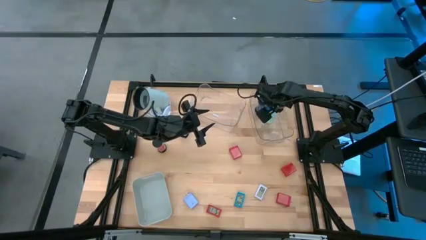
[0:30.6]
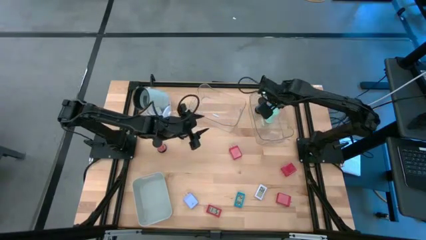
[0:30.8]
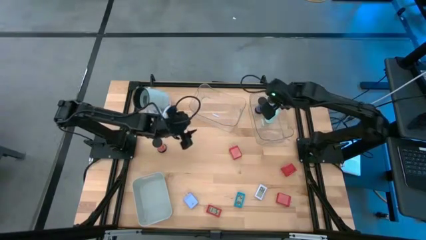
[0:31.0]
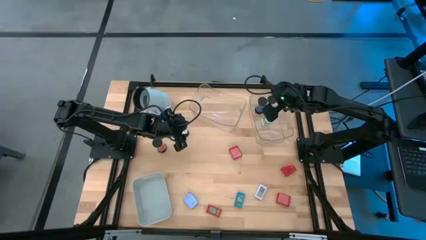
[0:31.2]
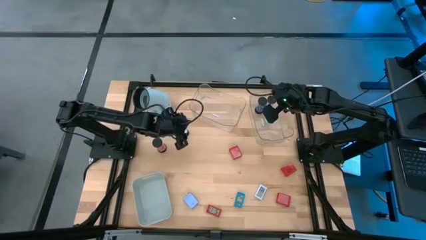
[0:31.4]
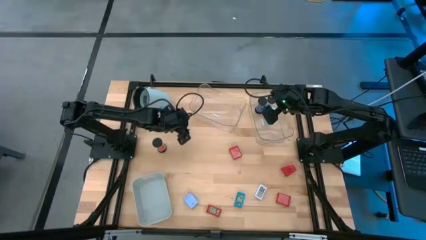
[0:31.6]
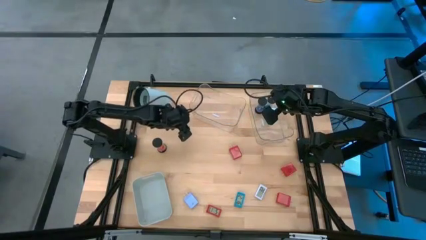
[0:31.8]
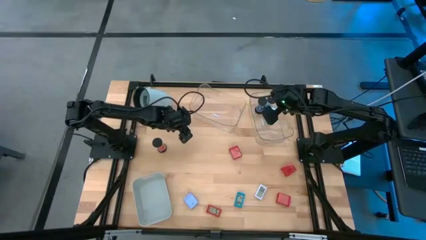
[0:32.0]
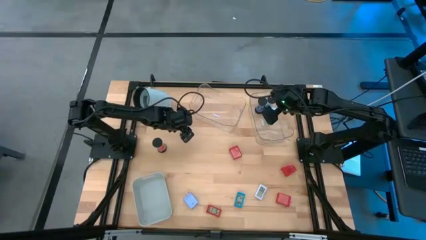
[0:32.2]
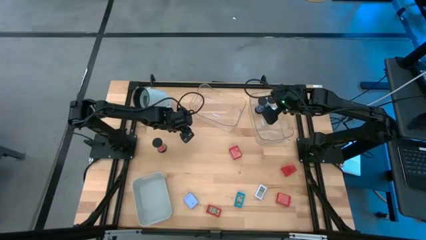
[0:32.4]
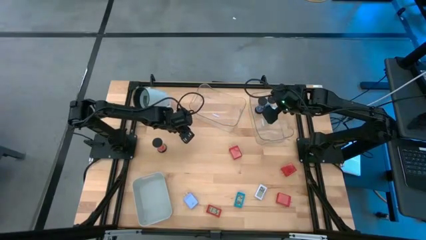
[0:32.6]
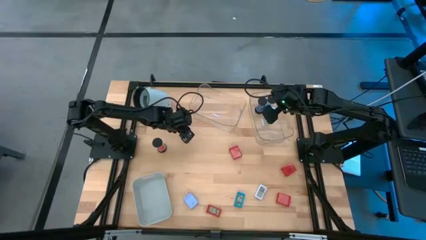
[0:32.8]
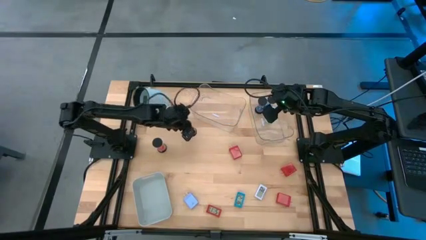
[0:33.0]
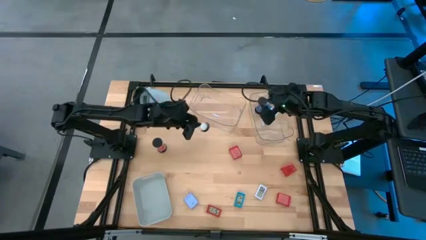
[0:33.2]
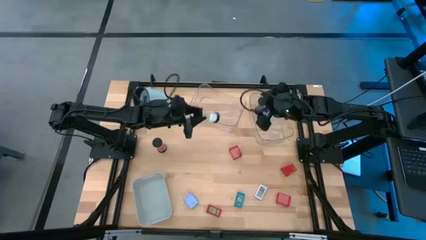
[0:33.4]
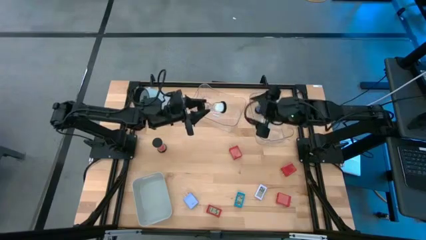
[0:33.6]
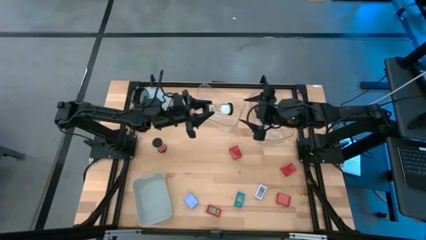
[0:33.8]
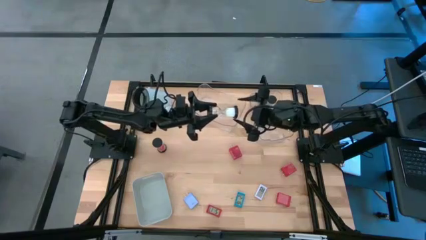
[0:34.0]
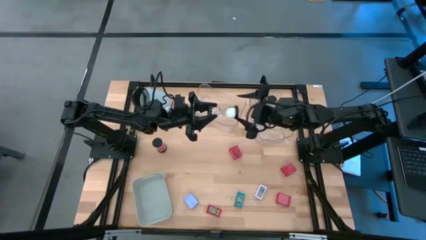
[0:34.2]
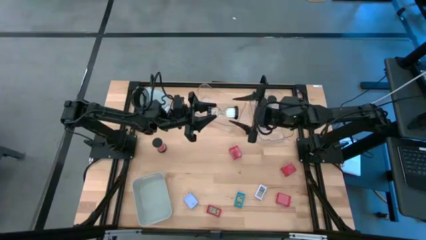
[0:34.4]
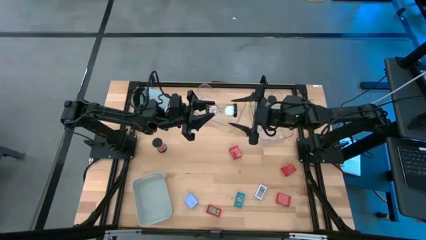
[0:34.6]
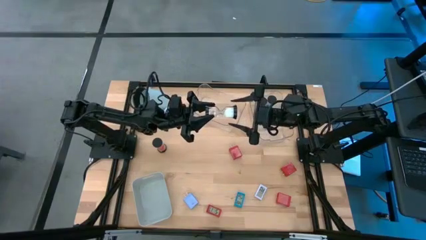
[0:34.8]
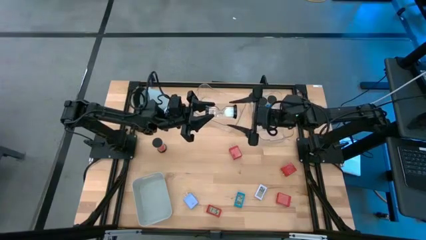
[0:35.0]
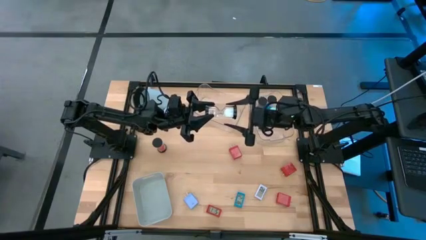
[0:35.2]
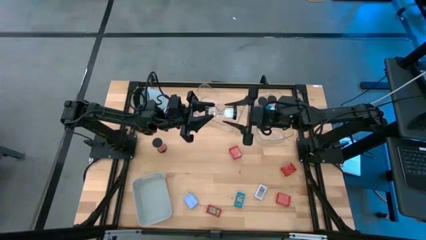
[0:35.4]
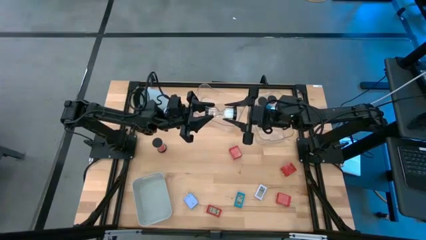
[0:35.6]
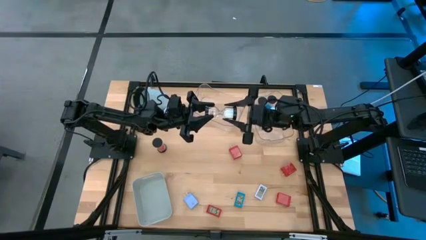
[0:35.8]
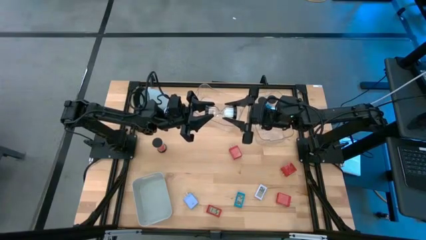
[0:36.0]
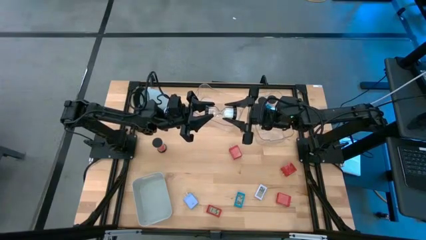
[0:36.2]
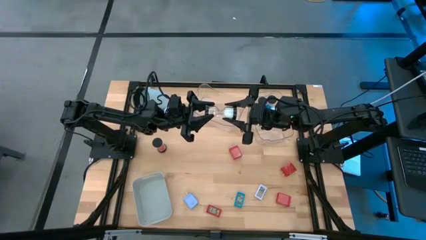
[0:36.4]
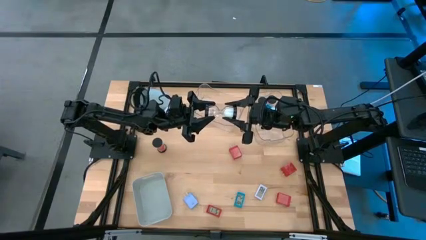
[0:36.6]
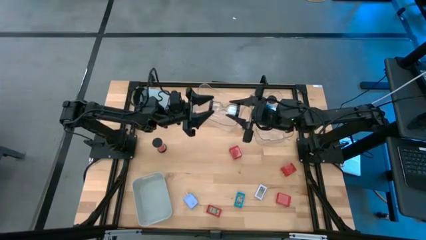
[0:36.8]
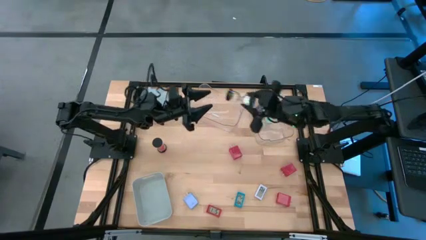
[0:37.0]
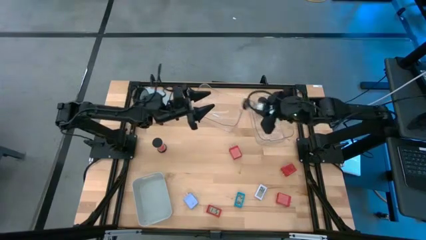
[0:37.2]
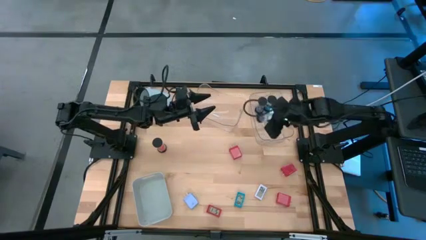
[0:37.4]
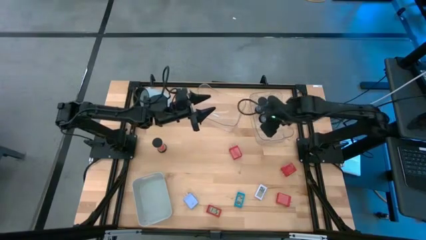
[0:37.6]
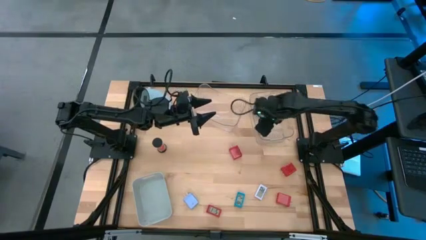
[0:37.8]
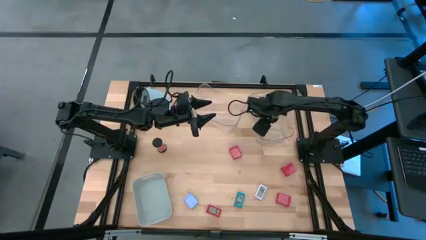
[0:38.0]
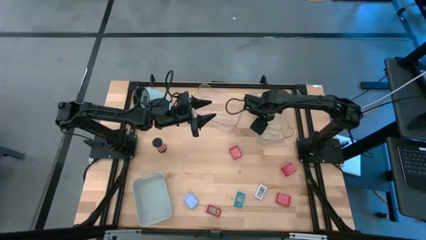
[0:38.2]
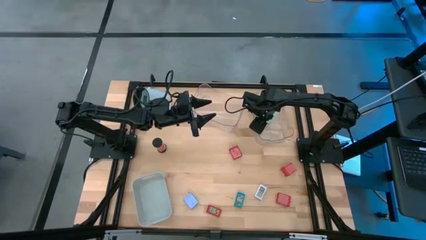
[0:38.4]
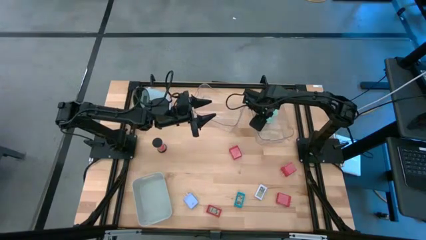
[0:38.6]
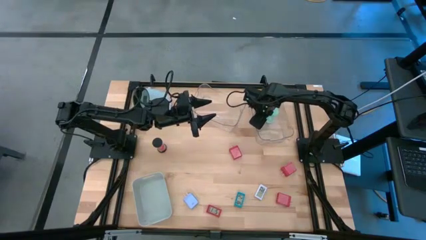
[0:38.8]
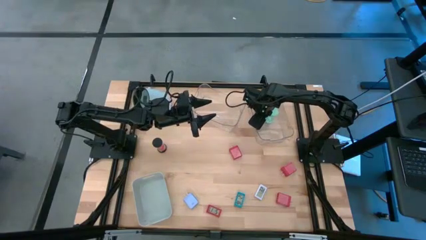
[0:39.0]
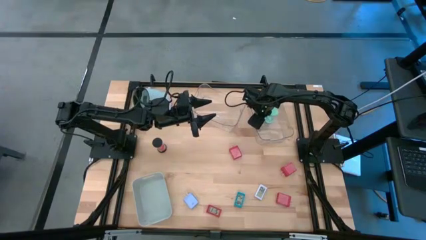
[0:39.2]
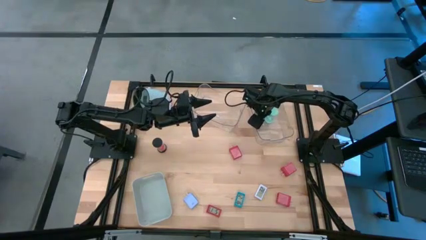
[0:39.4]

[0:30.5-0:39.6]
Task: Pick & Place Office items
Put the white hourglass into the right transparent bin

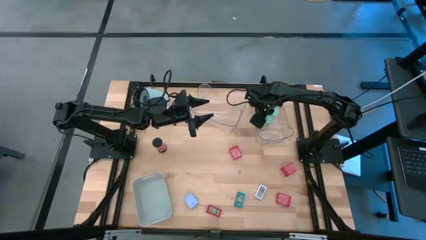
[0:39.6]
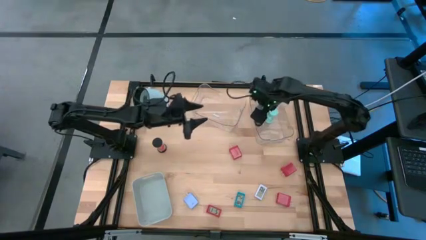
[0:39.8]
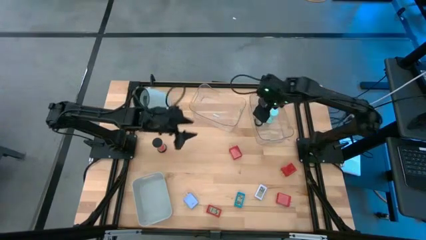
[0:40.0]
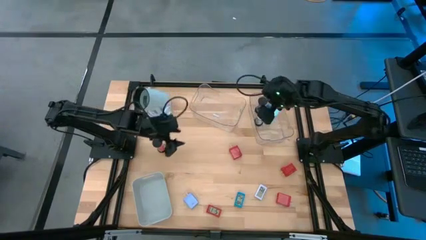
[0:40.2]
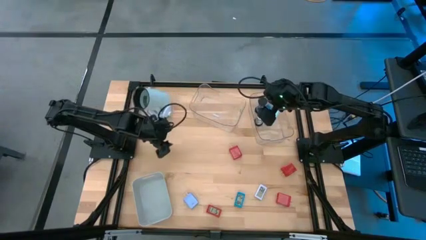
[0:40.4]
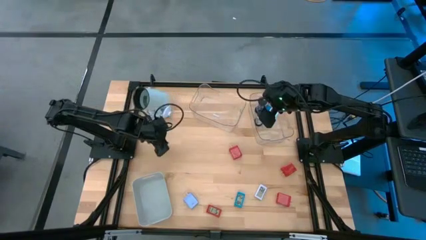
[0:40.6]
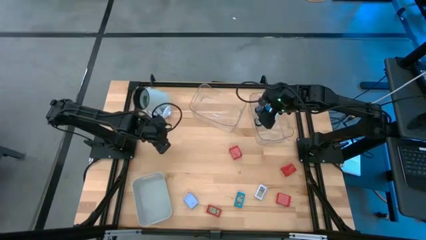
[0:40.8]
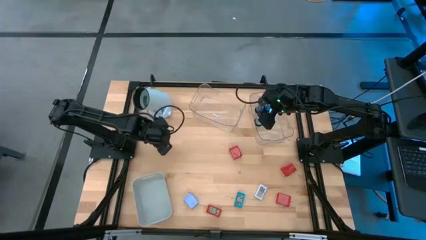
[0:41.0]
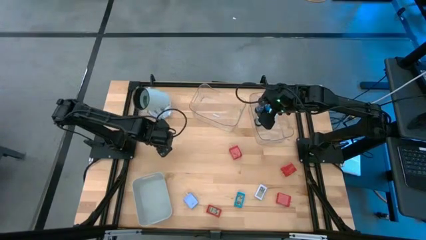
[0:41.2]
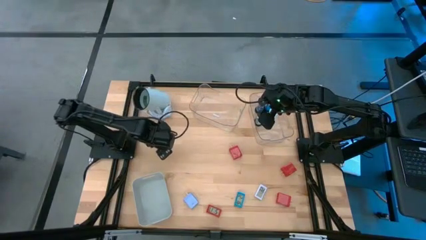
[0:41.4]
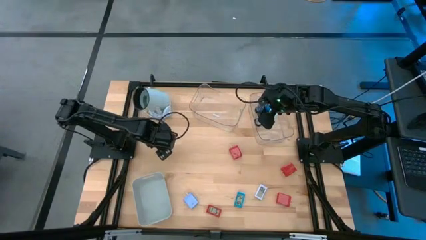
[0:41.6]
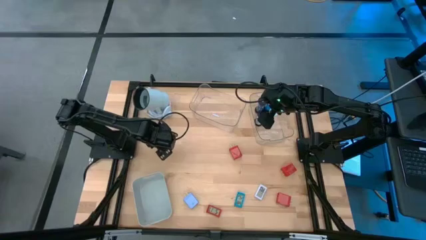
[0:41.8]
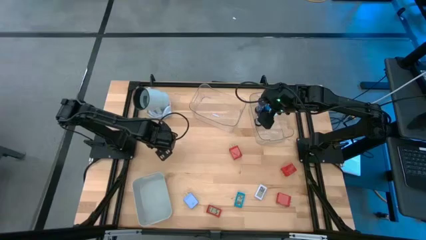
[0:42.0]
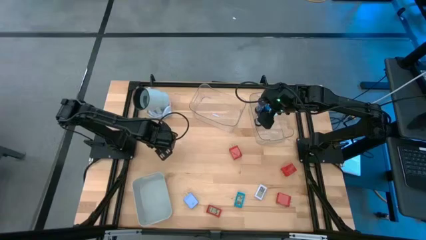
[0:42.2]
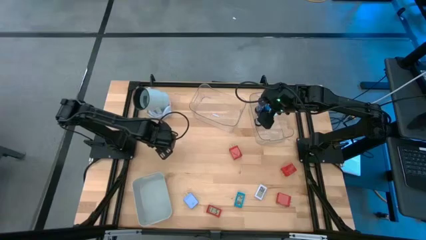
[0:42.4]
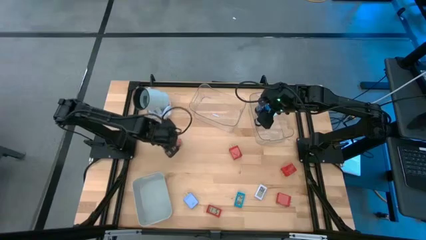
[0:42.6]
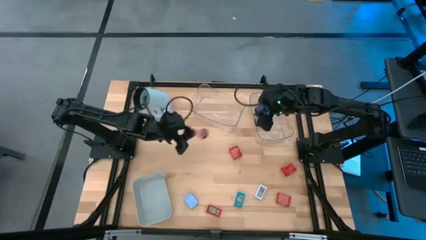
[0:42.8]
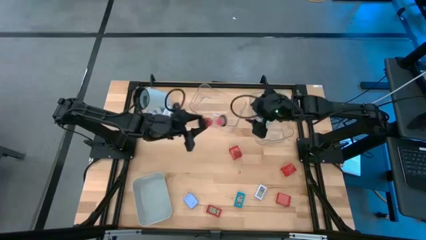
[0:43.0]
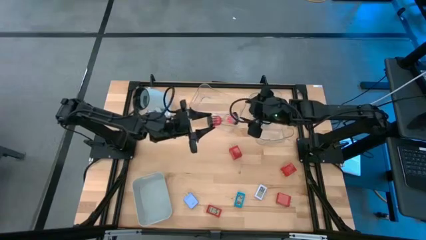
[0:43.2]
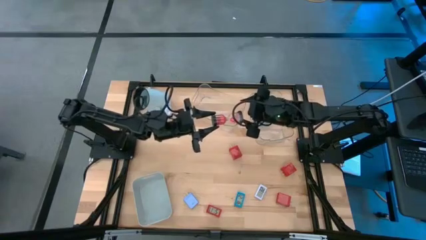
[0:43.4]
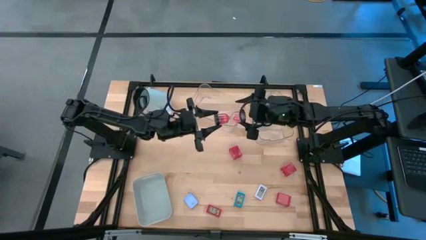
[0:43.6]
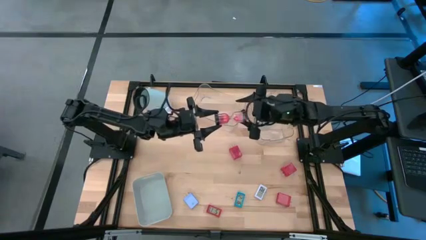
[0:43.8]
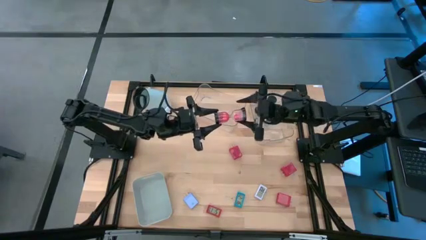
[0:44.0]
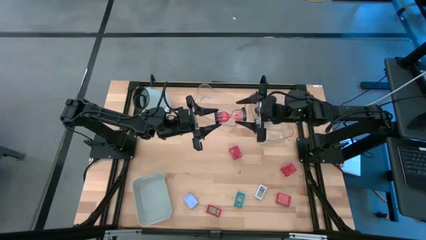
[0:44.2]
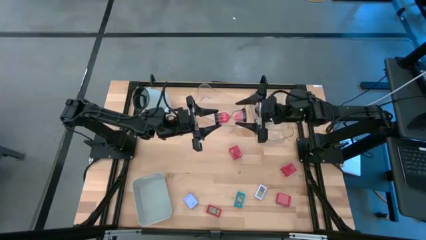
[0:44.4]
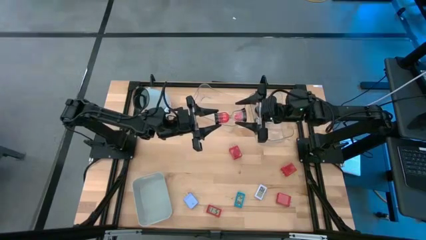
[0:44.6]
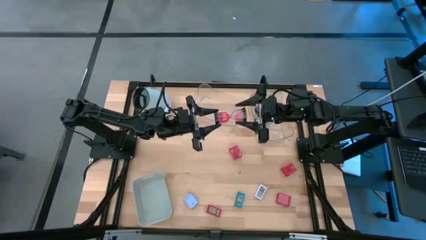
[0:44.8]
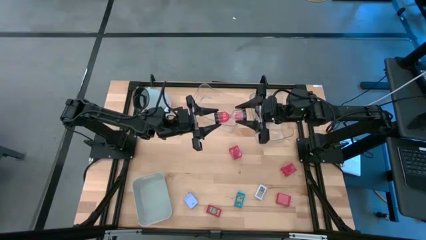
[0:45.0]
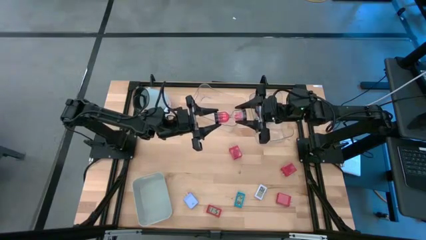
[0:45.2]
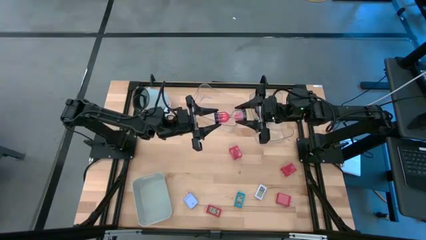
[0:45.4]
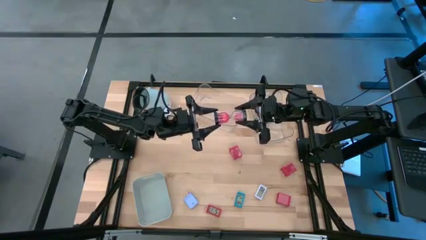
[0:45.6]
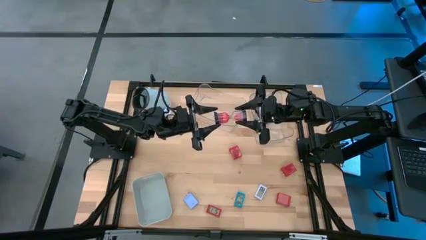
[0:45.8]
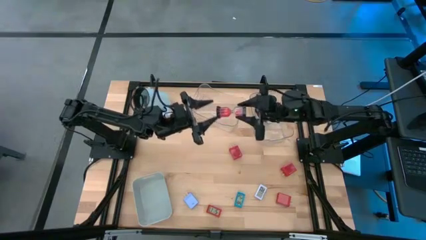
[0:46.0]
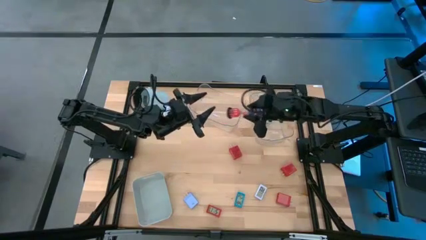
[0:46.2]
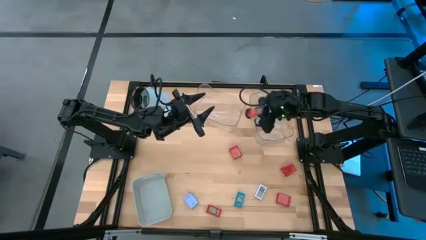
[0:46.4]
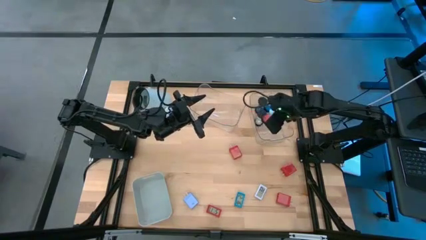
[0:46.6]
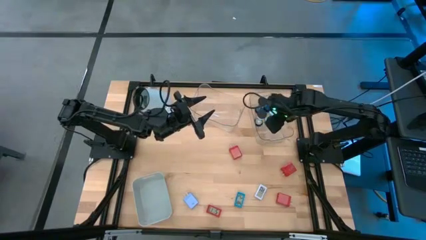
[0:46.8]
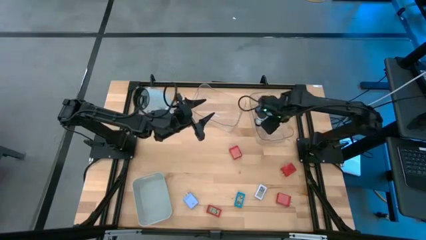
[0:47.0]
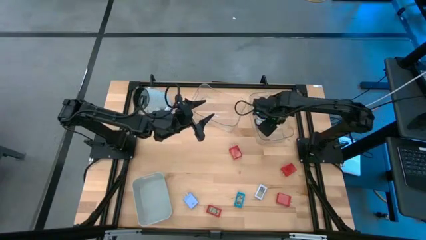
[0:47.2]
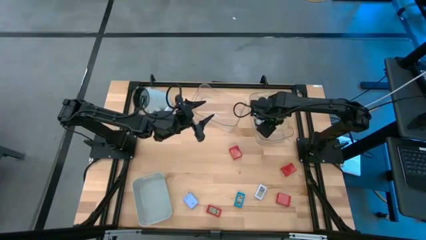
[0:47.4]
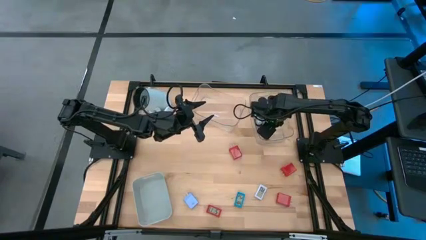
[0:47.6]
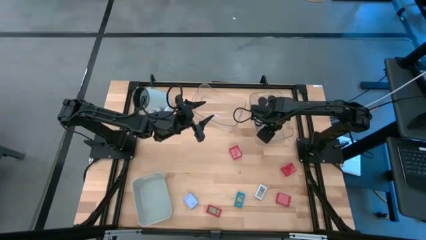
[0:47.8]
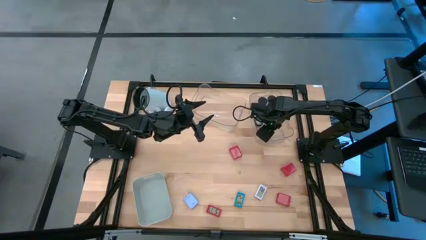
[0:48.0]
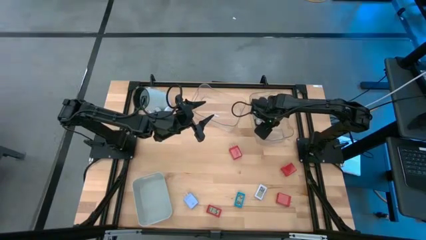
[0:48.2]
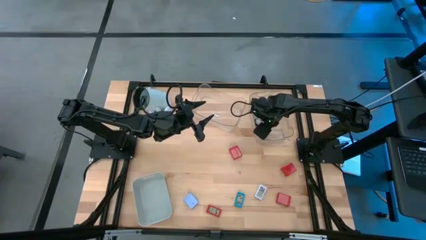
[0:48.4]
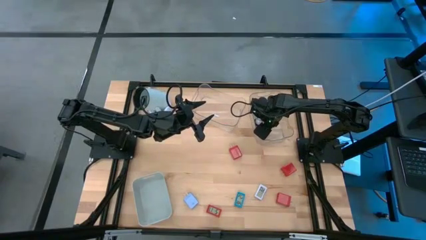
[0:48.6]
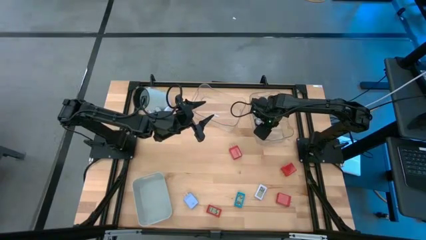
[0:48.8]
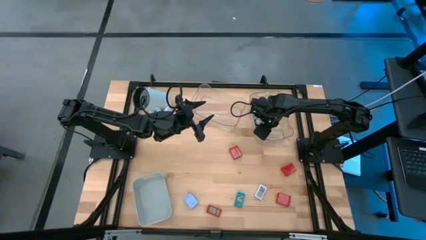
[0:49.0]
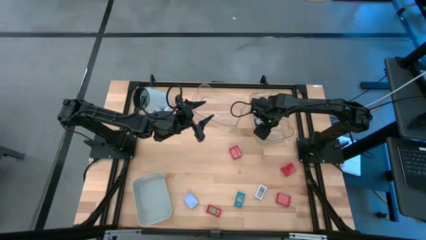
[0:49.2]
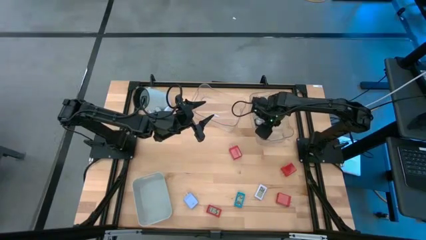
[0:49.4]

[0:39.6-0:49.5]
Put the red hourglass into the right transparent bin
